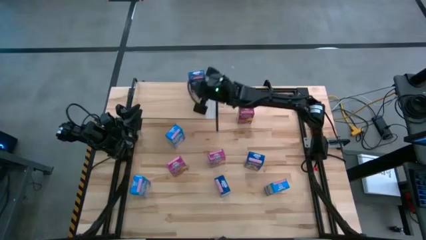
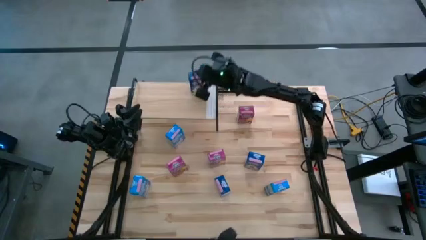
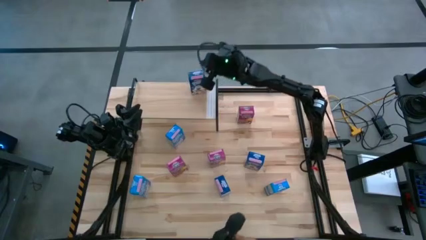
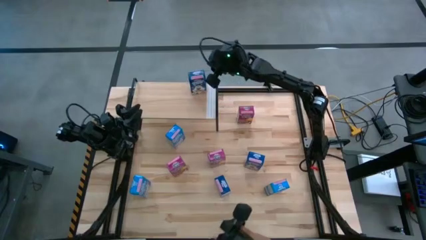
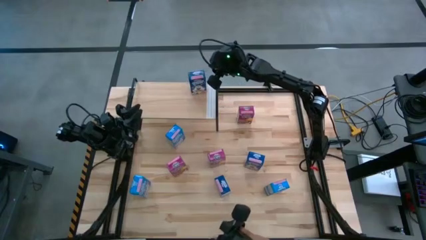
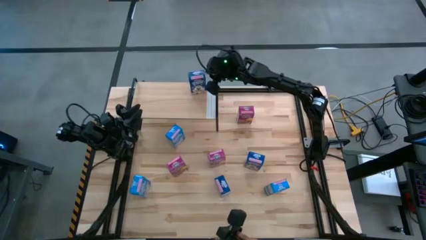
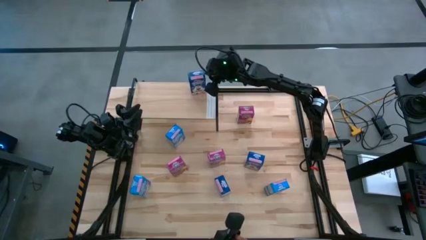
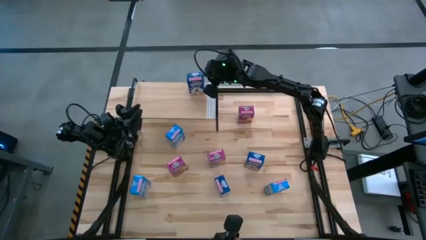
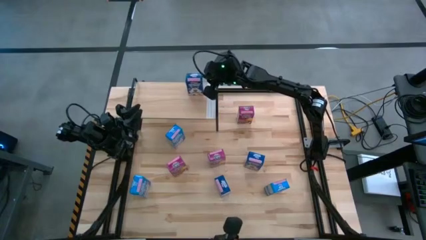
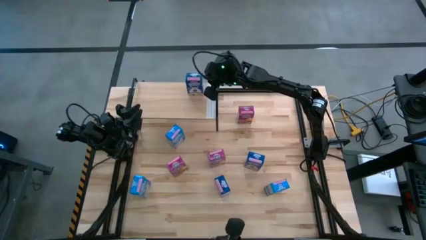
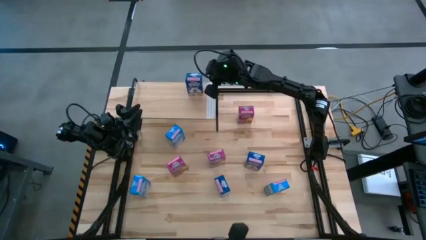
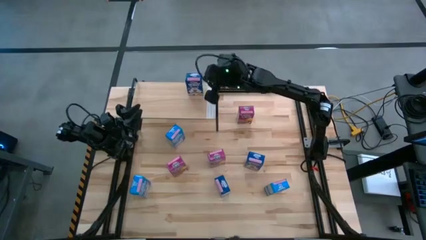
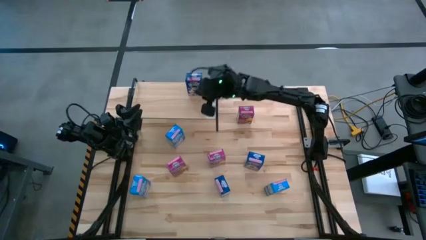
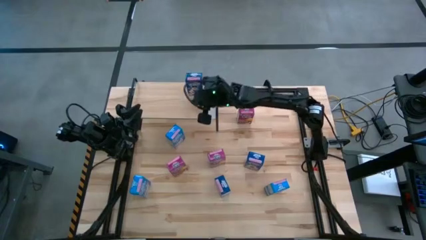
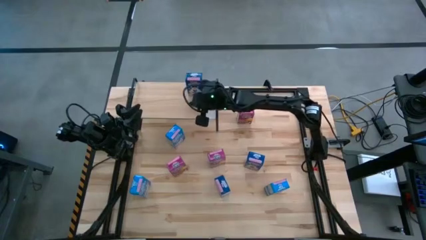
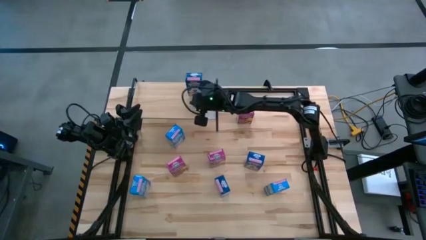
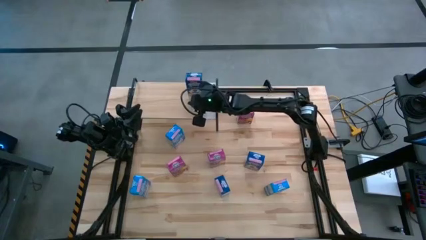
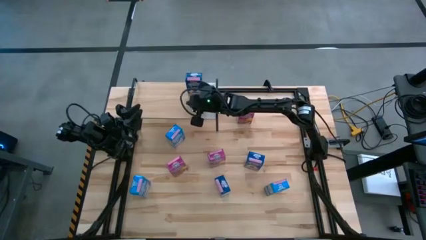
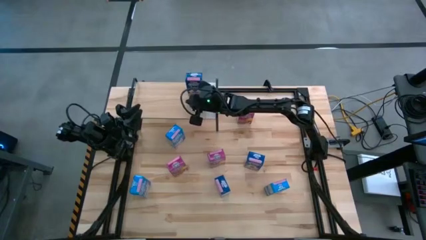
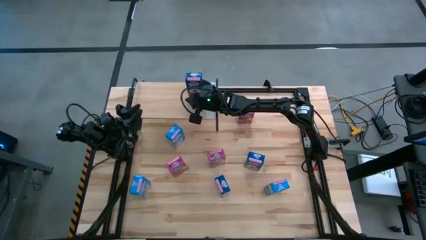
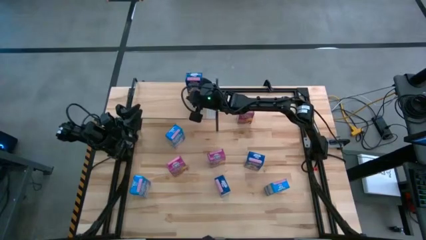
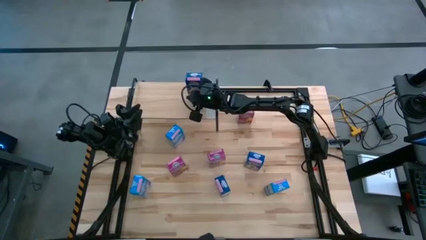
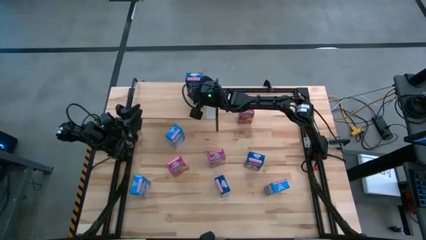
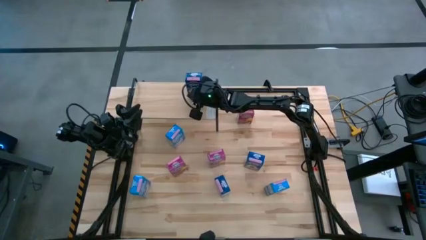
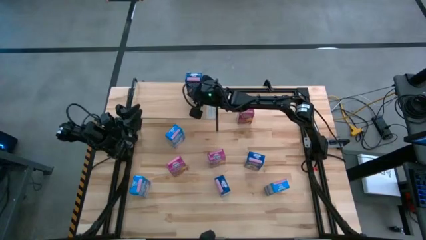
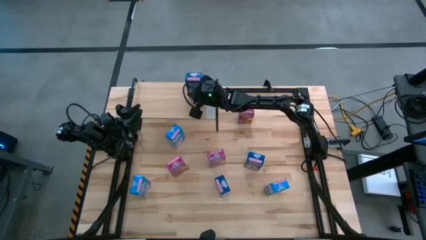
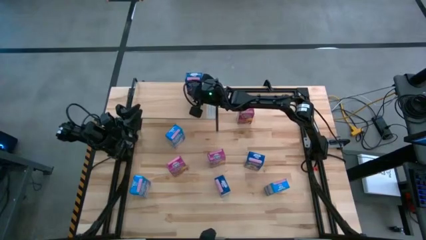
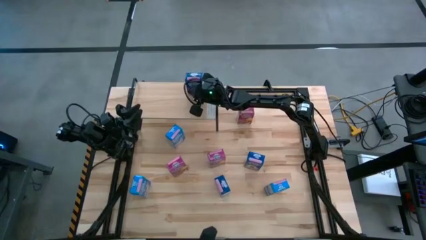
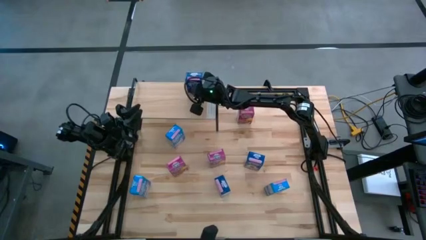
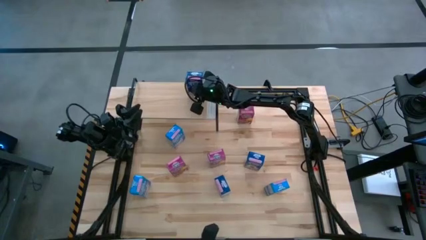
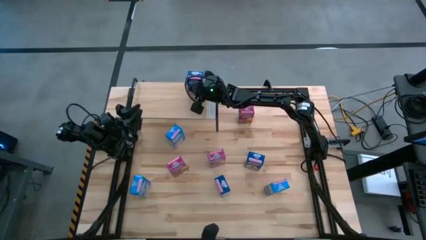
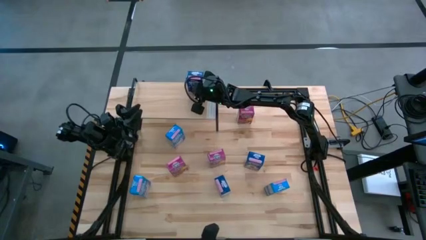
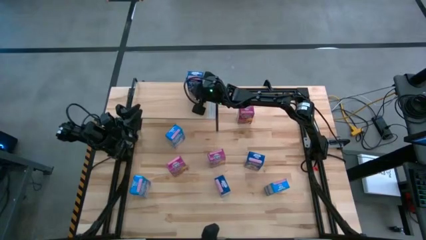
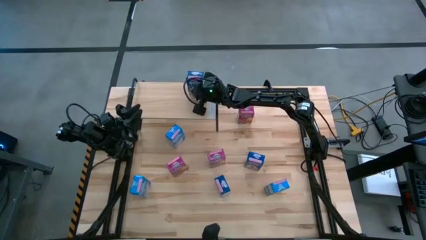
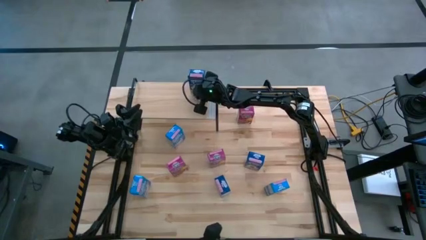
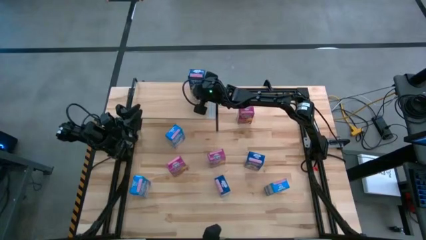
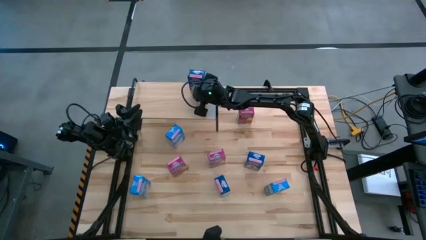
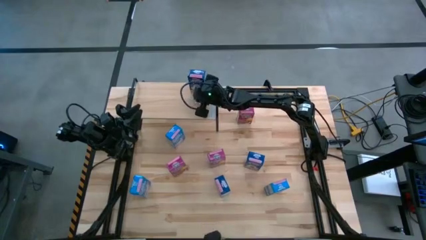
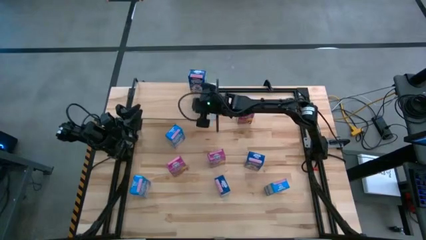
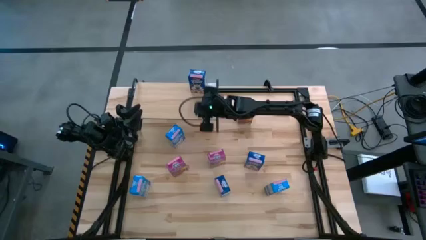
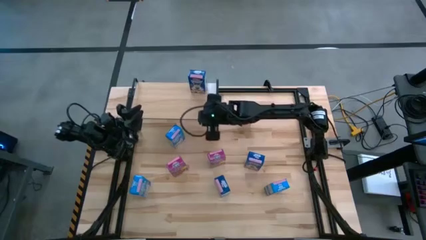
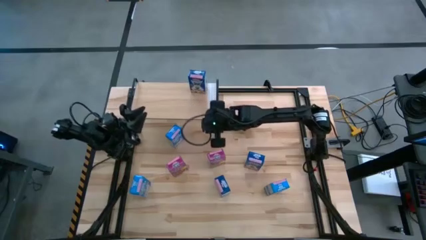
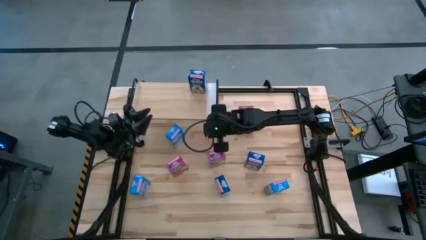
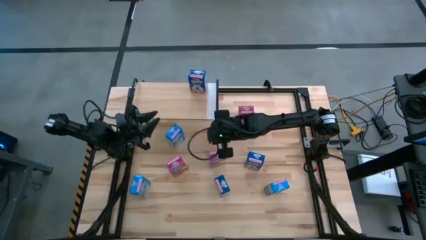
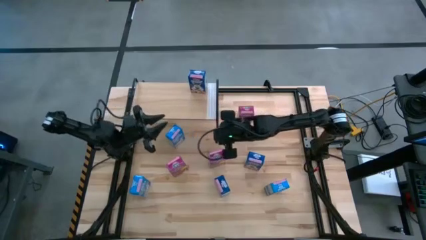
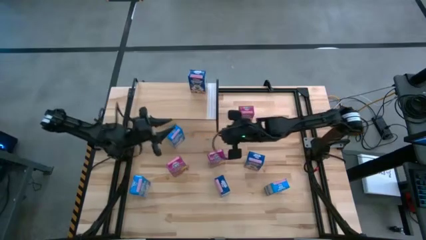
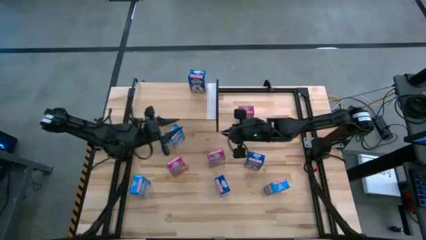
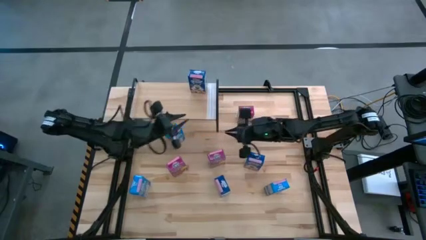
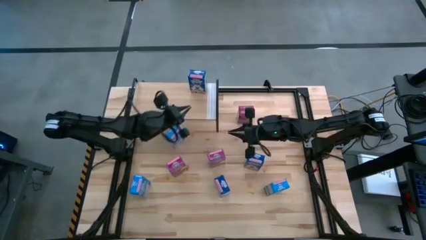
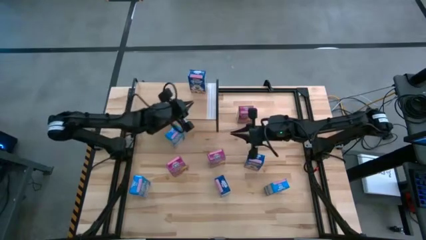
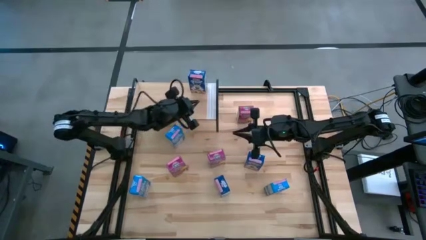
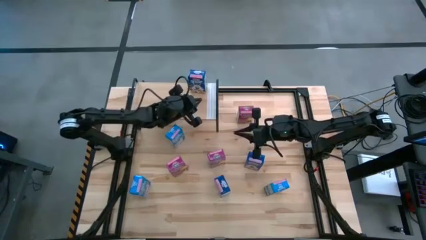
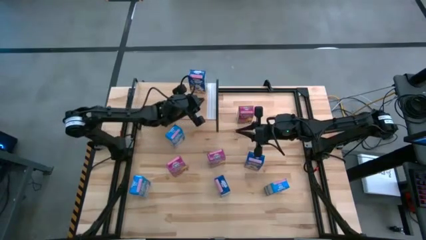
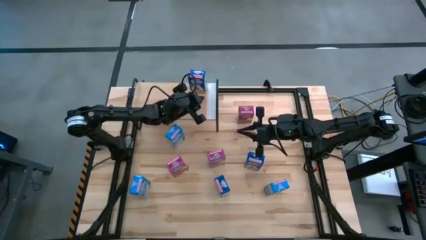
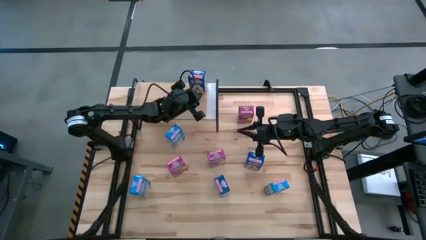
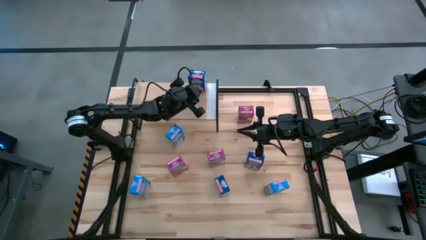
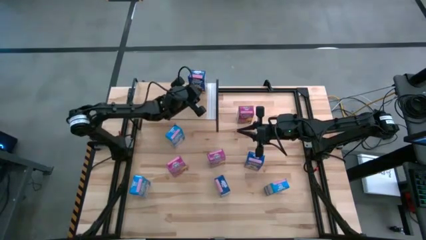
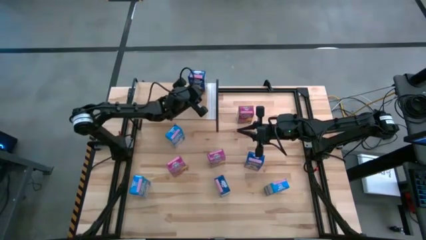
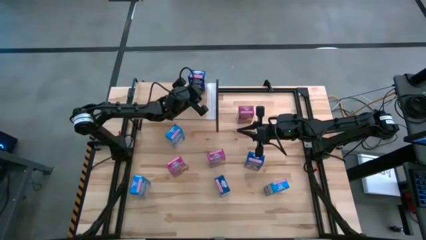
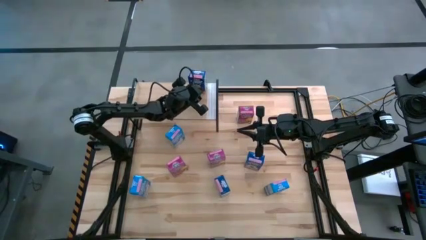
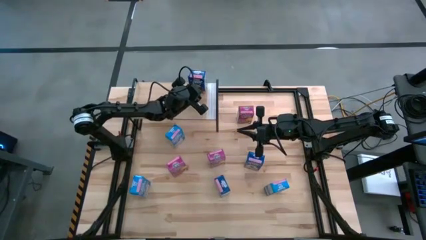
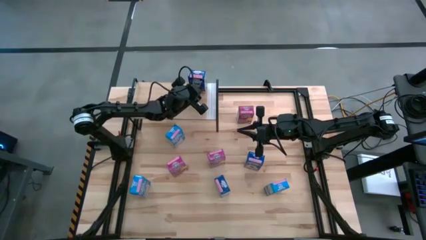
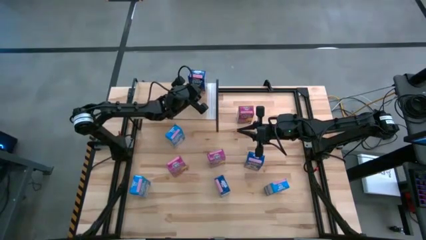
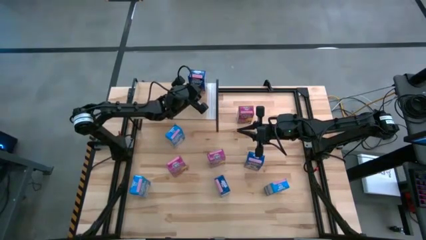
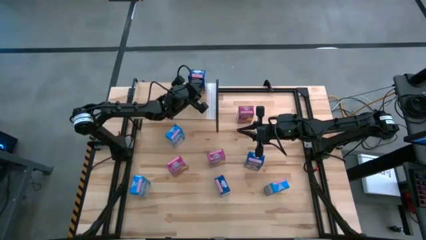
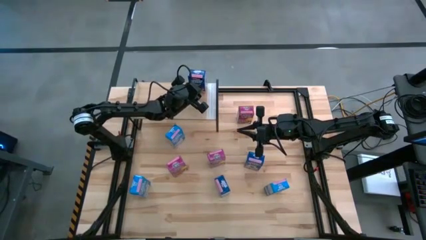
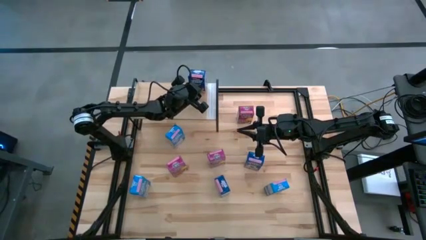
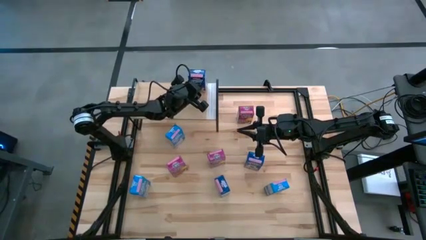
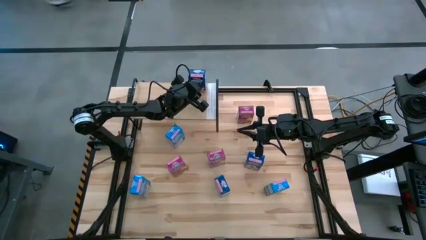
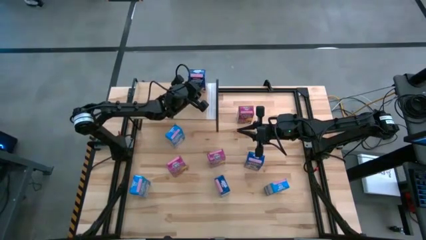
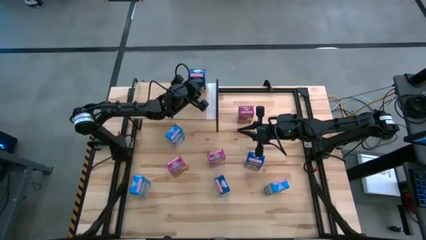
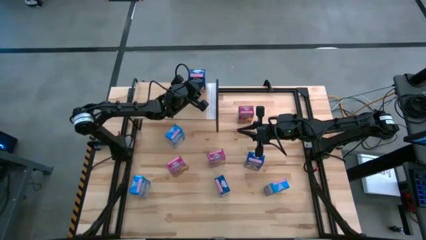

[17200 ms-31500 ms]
Task: Stack cereal on shelf
Put the top blue cereal box on the shelf
